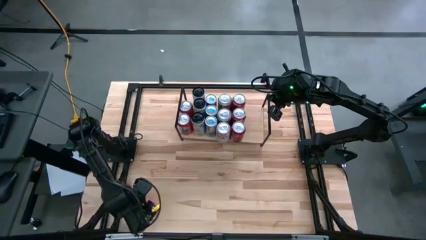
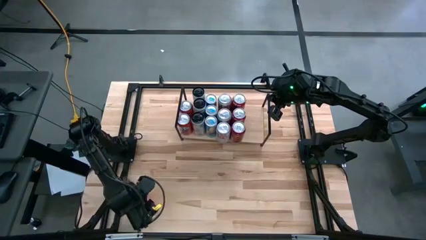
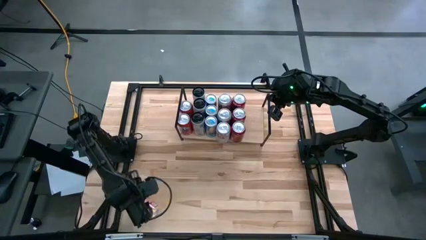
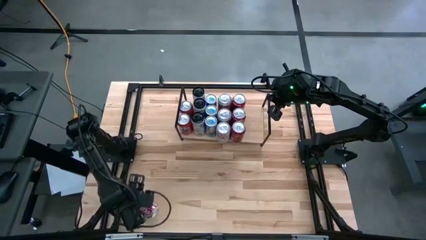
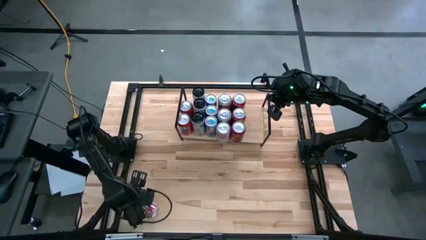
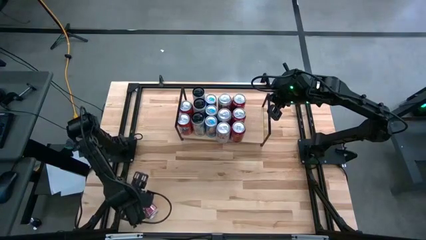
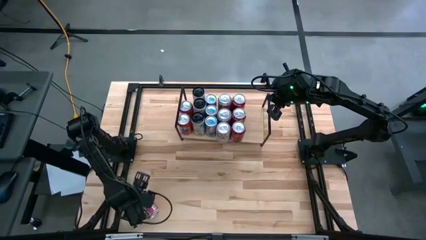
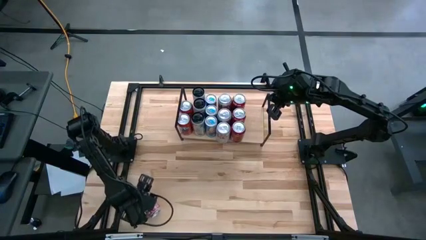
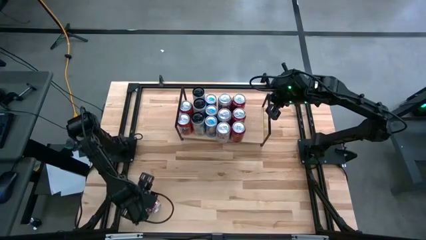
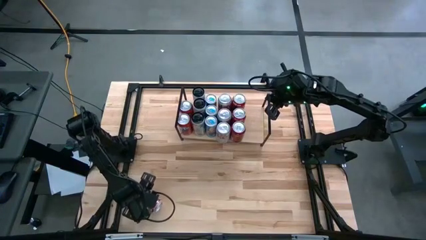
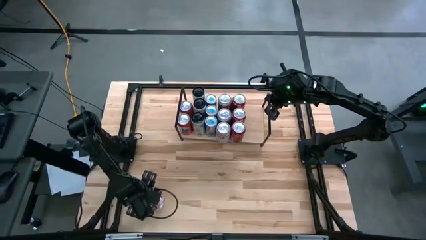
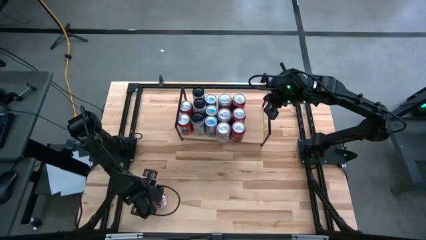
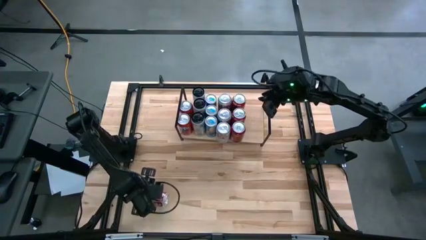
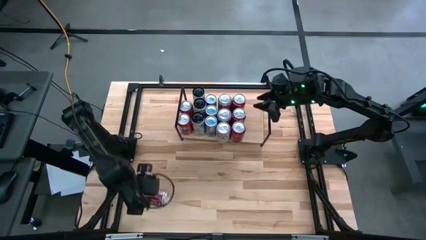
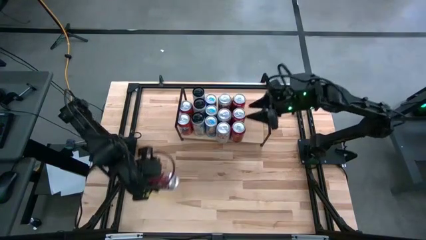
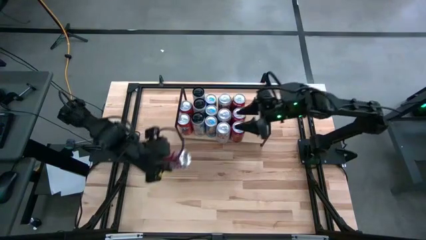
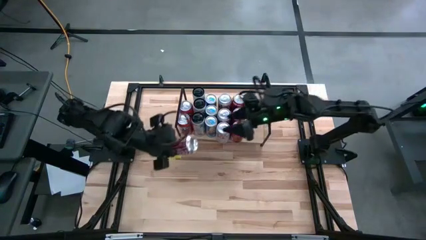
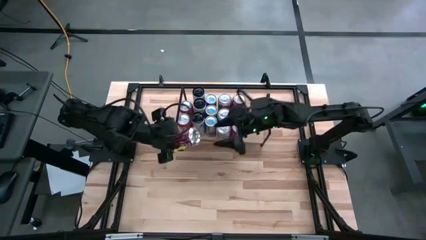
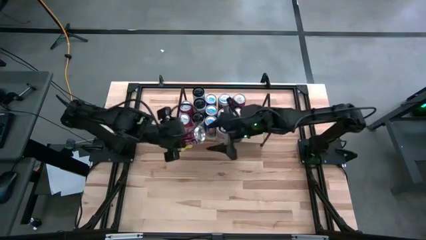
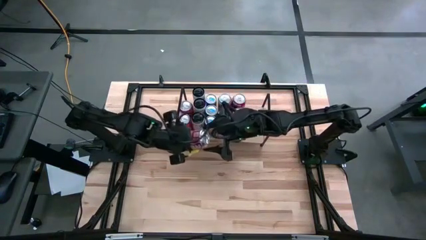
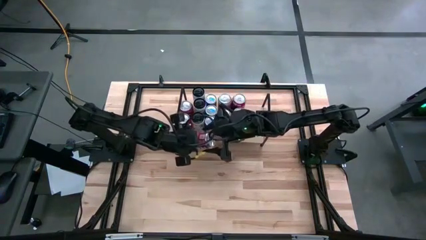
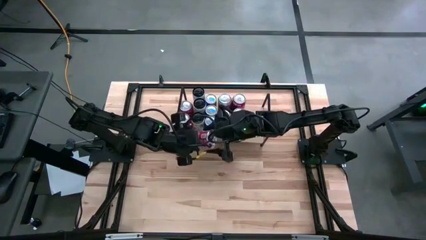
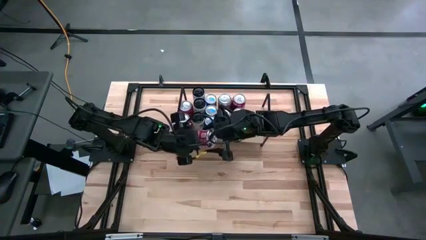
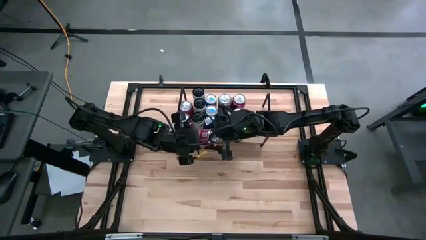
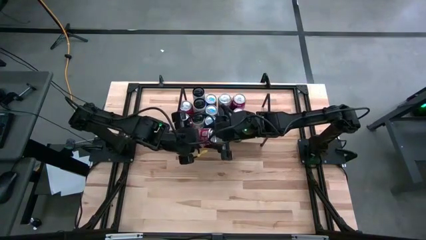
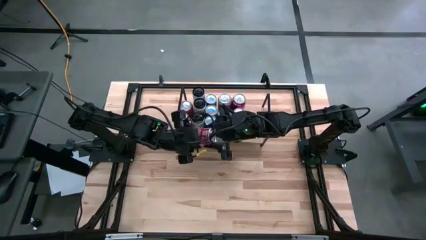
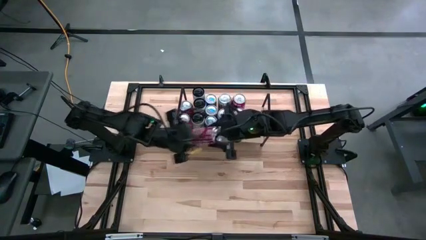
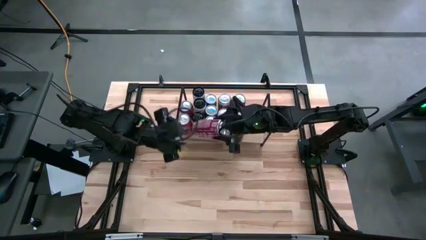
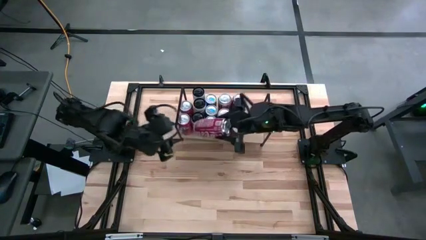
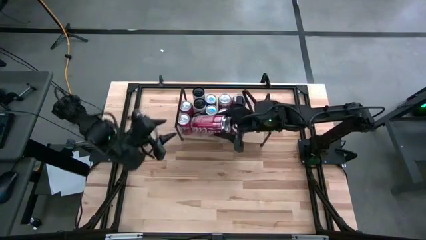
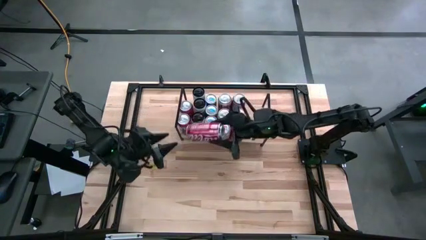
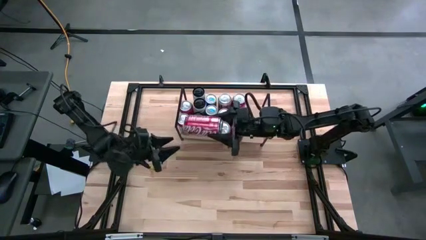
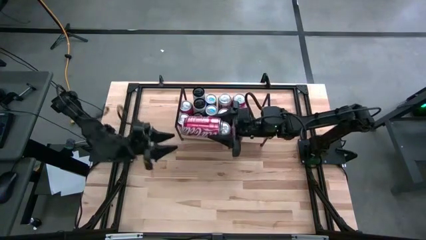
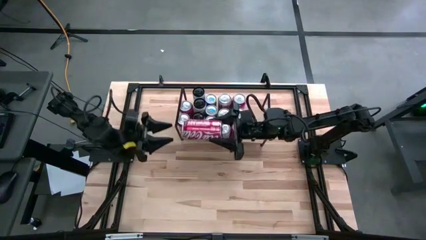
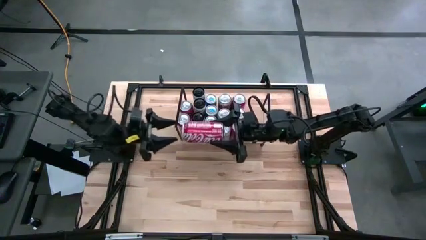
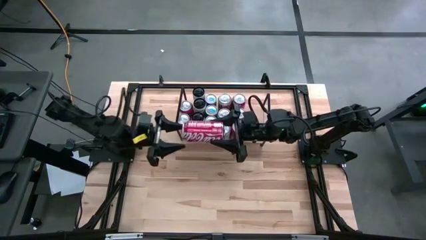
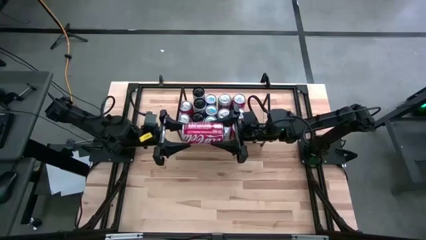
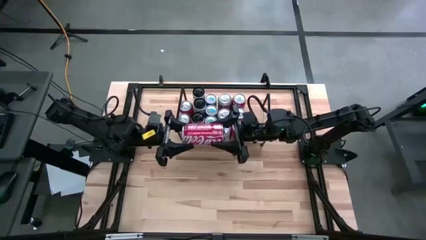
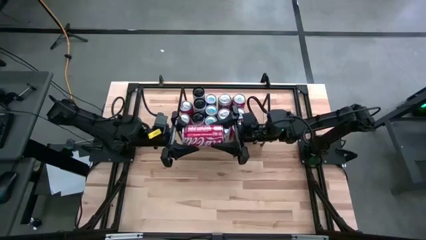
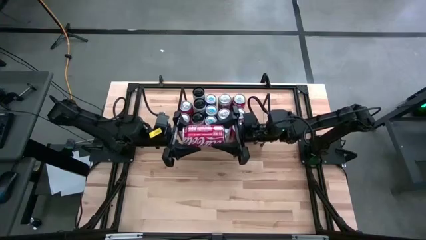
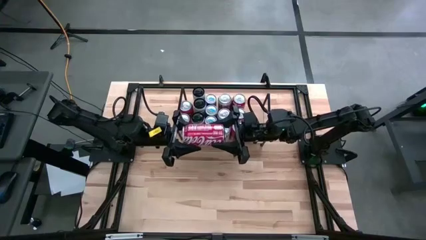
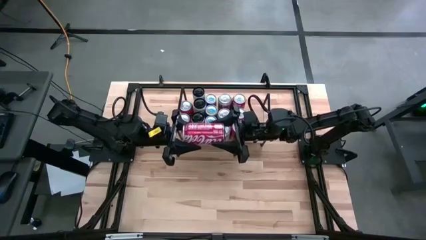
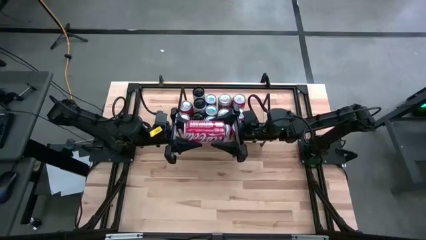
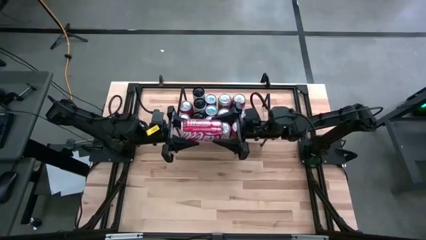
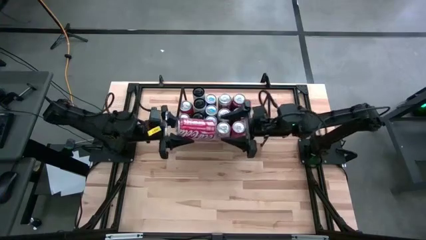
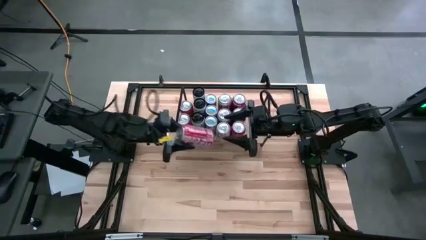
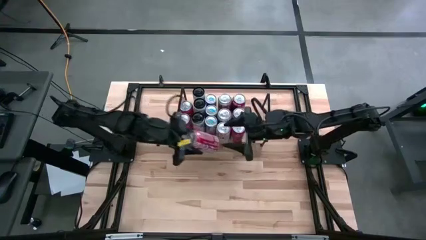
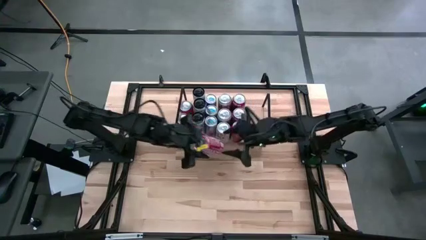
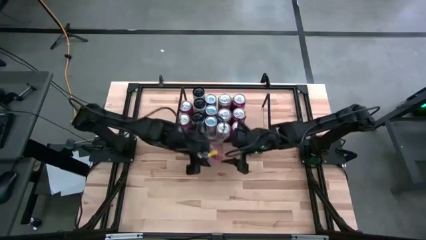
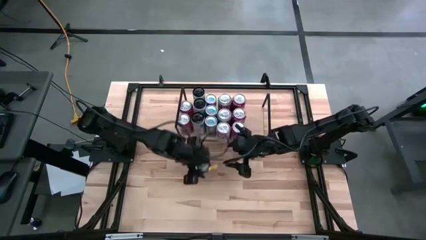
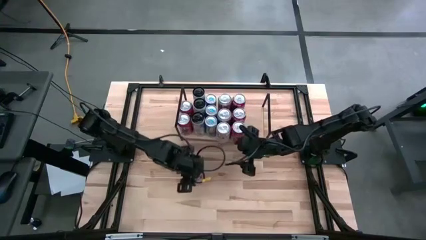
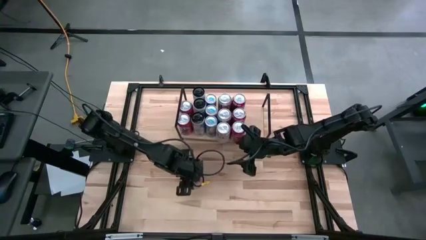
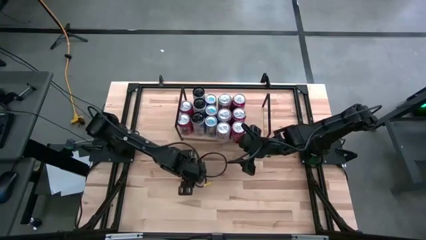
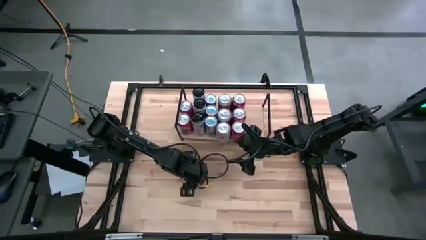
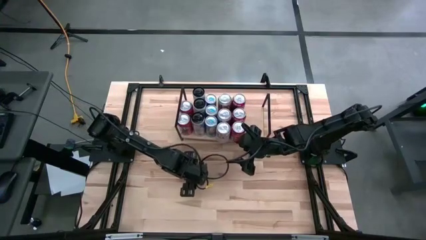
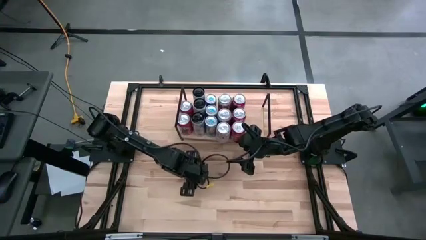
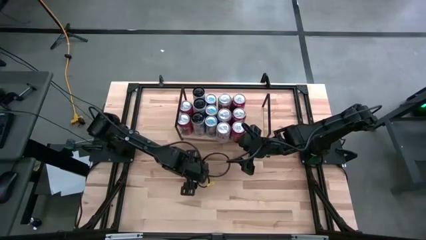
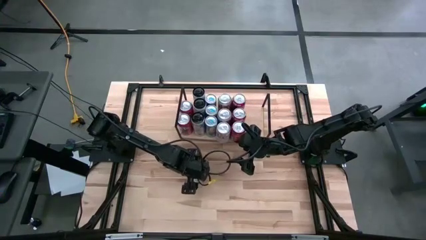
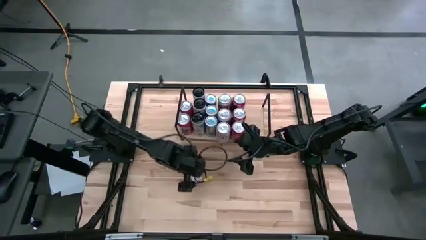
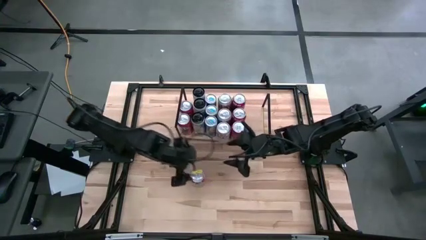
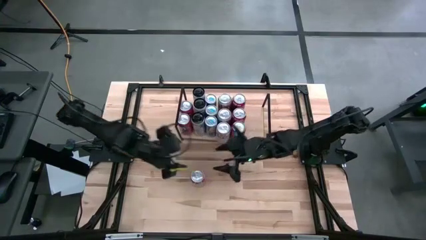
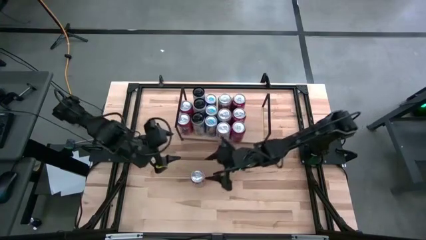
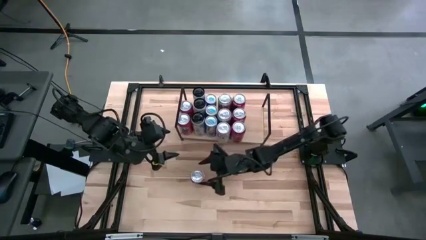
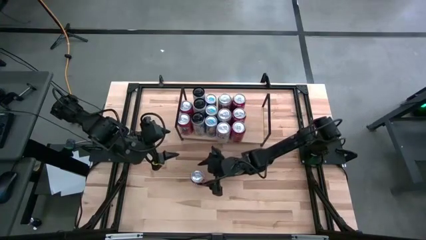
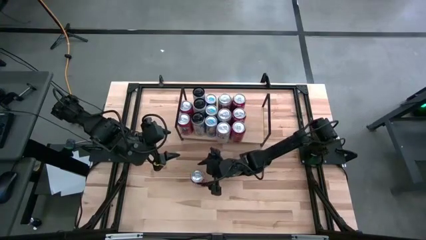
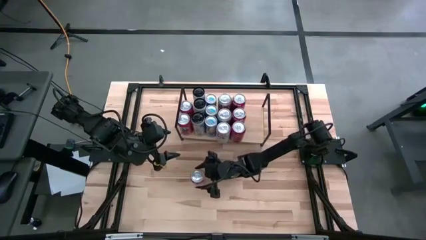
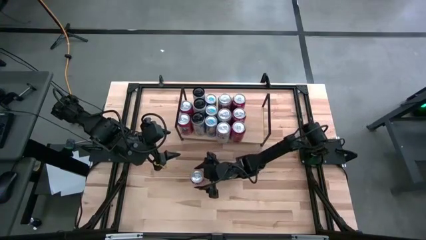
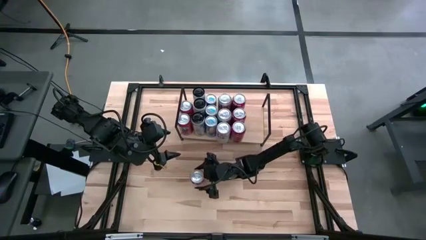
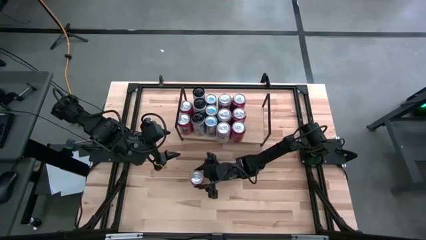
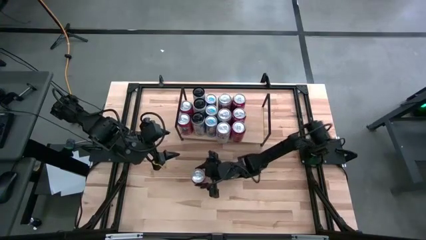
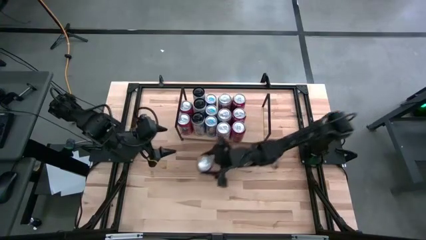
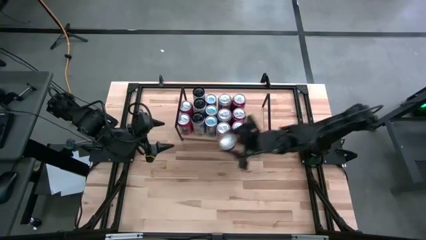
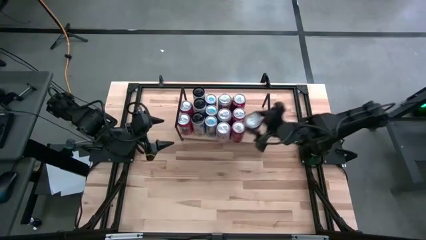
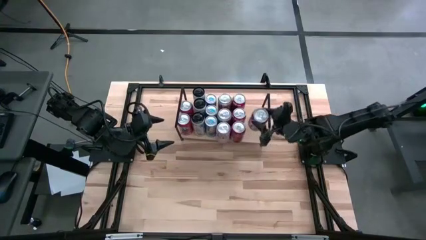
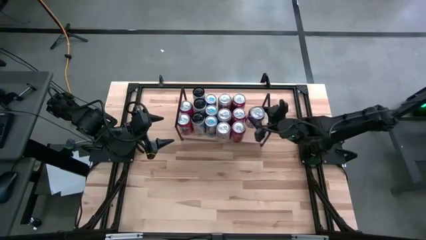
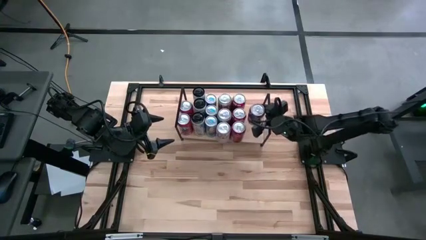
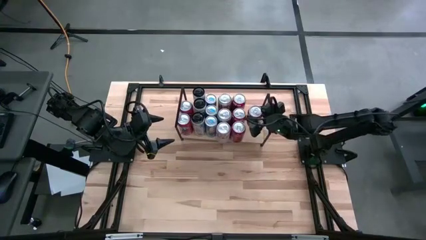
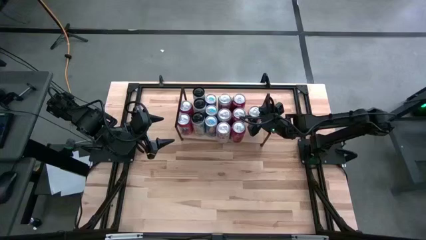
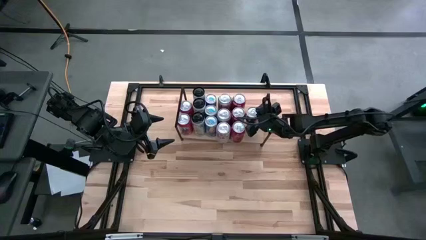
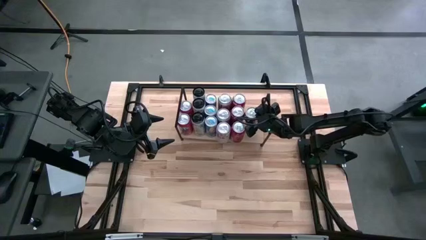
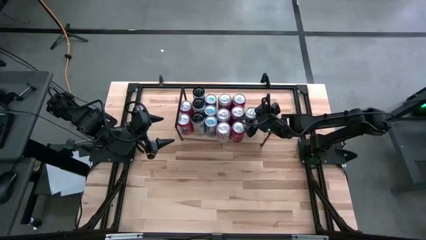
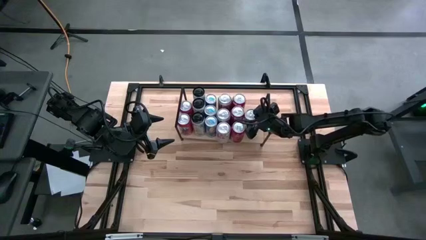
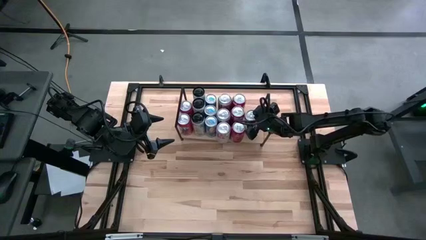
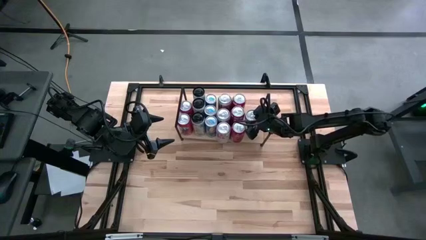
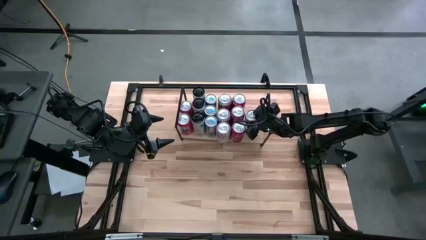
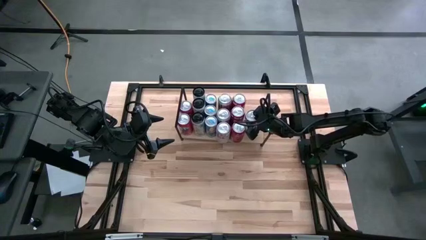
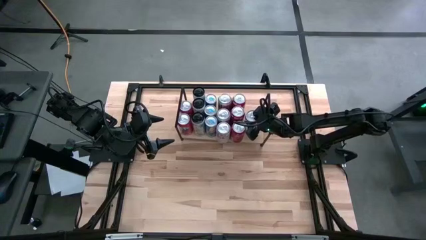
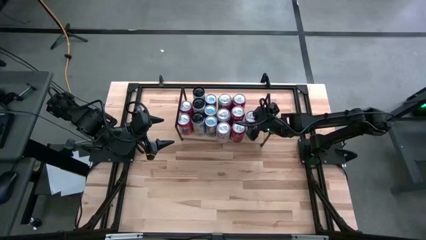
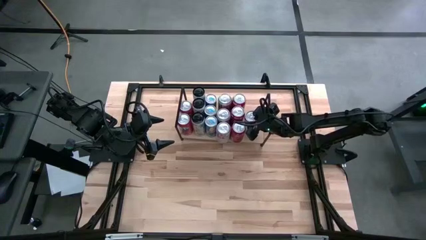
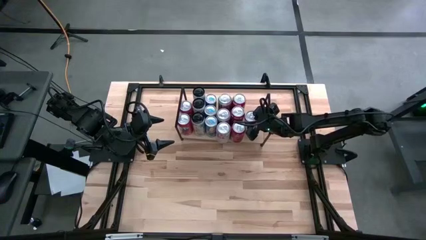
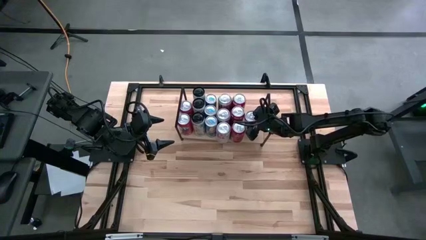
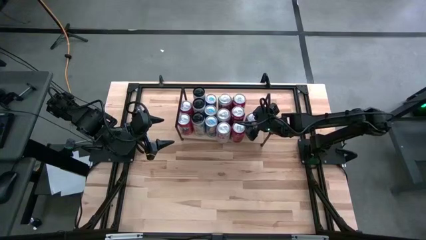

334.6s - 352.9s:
Task: Place canned beverage on shelf
Put the red-white soda can on the shelf
